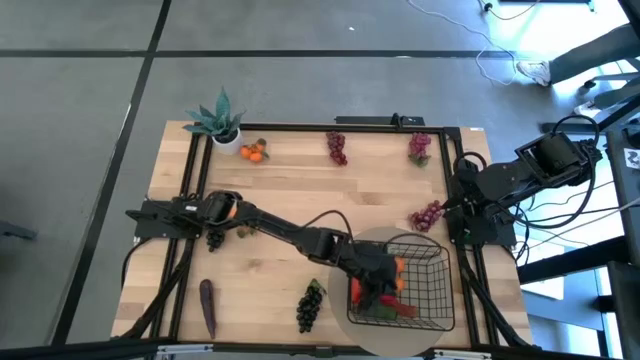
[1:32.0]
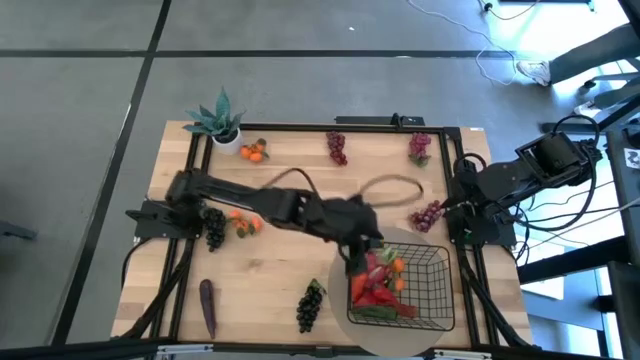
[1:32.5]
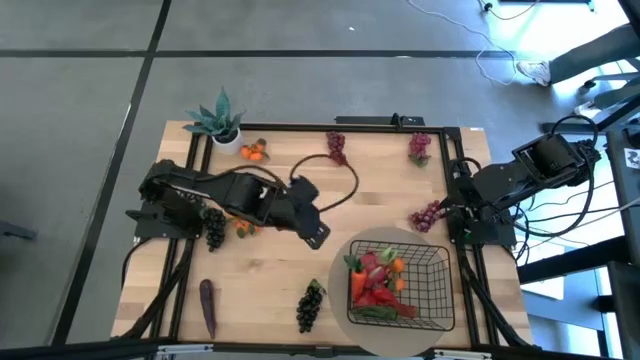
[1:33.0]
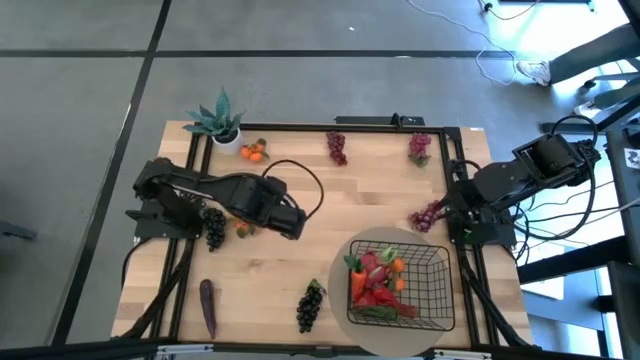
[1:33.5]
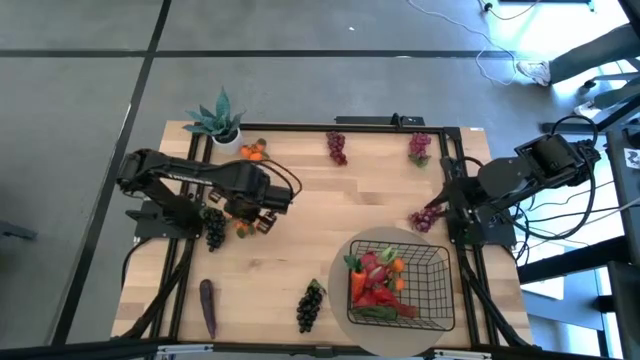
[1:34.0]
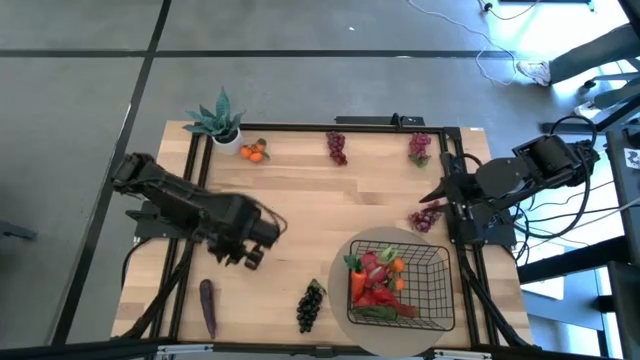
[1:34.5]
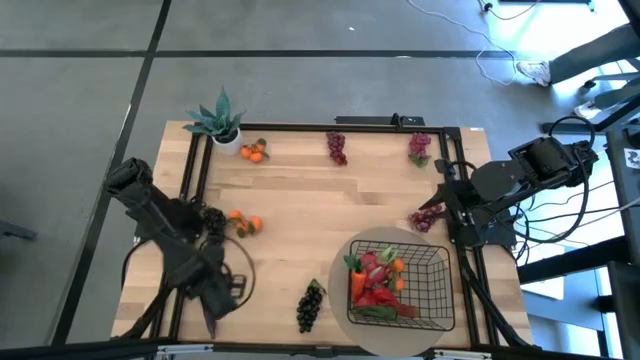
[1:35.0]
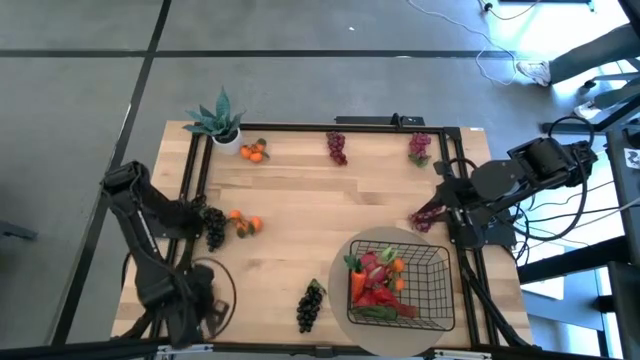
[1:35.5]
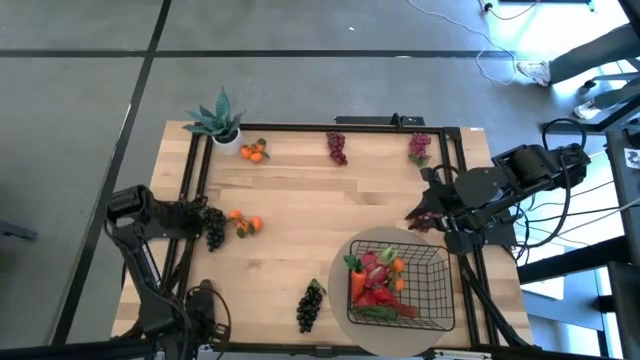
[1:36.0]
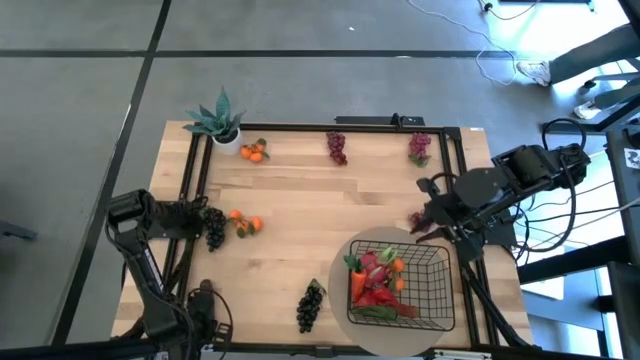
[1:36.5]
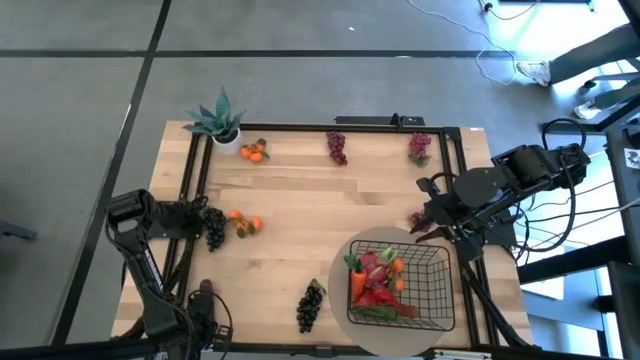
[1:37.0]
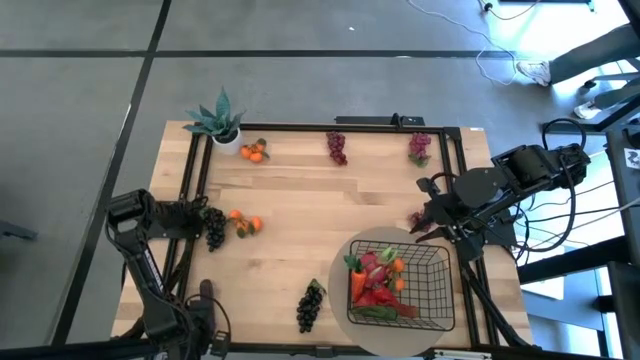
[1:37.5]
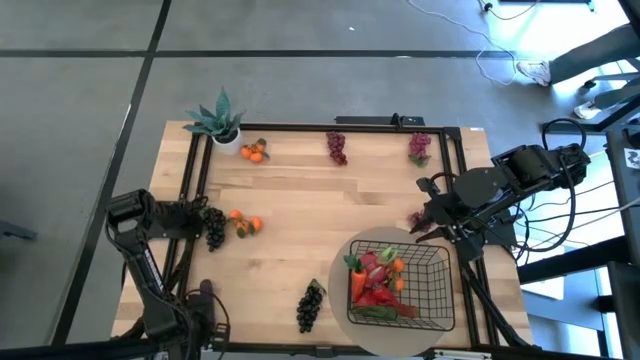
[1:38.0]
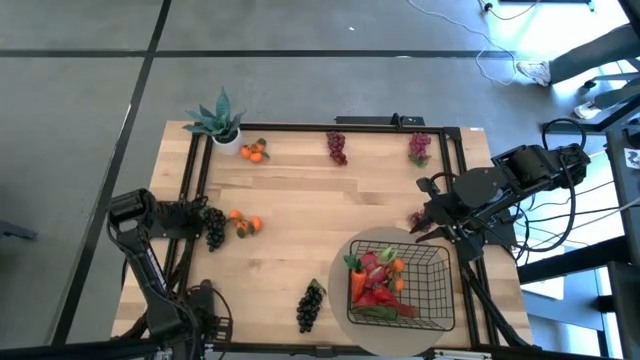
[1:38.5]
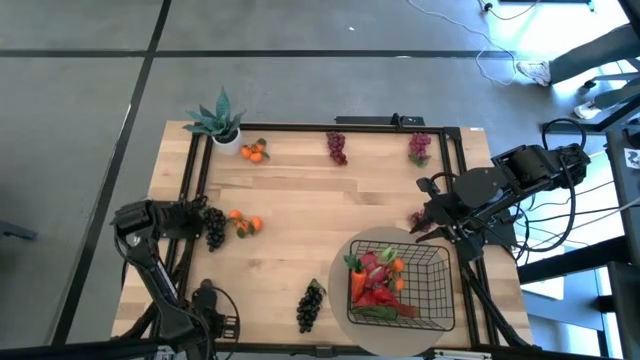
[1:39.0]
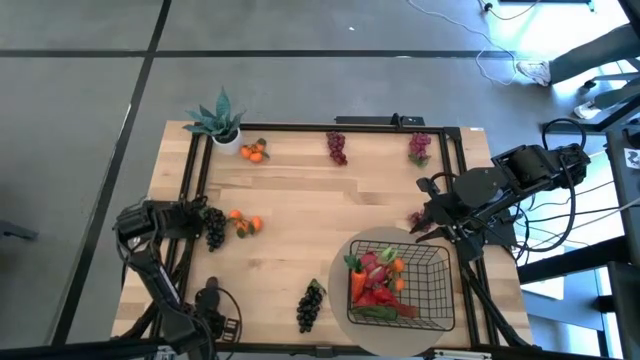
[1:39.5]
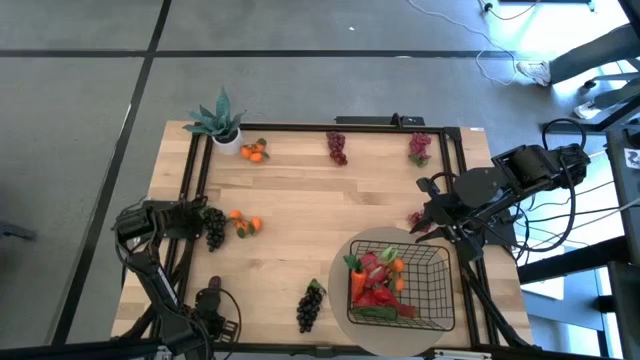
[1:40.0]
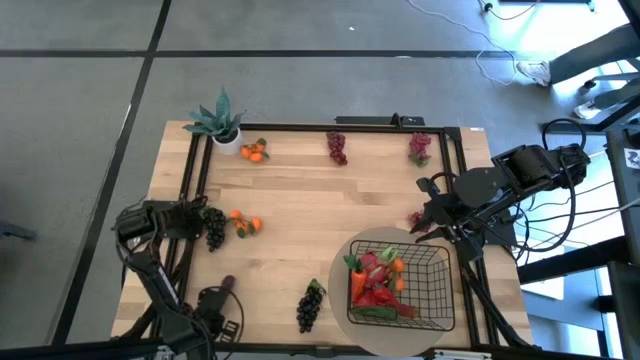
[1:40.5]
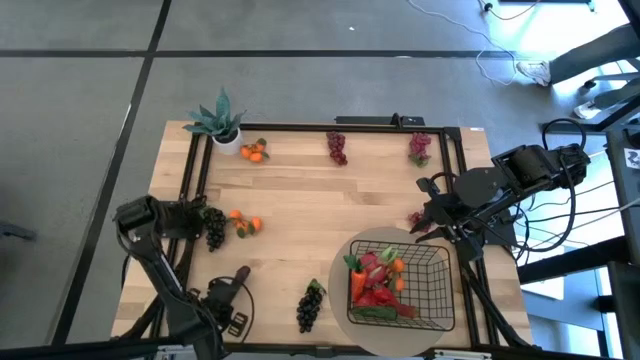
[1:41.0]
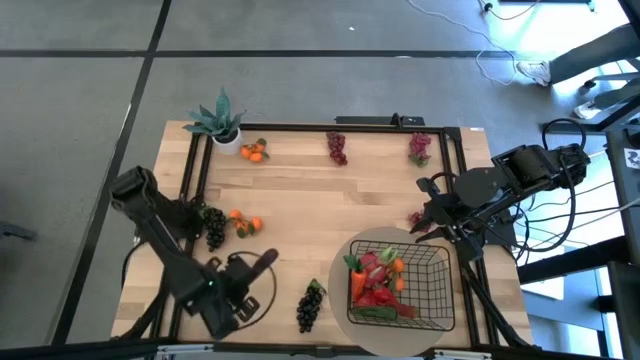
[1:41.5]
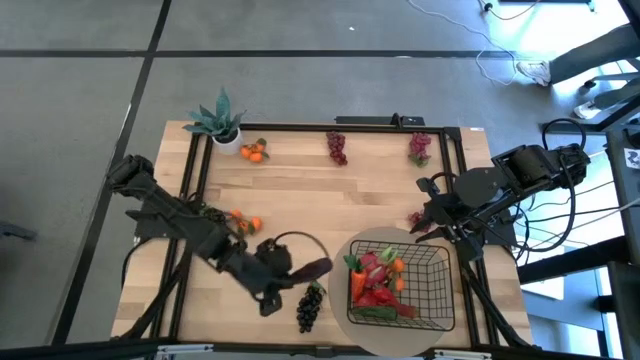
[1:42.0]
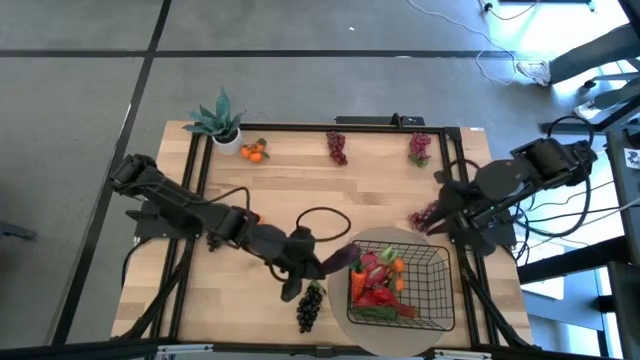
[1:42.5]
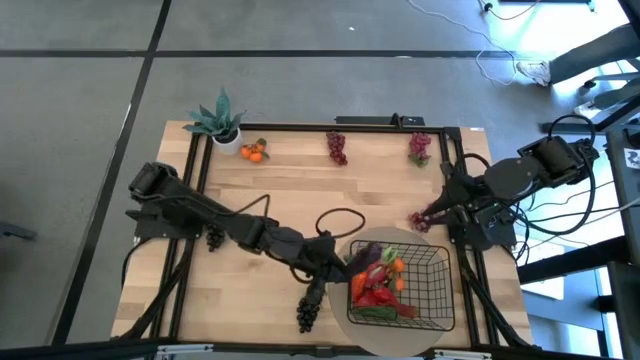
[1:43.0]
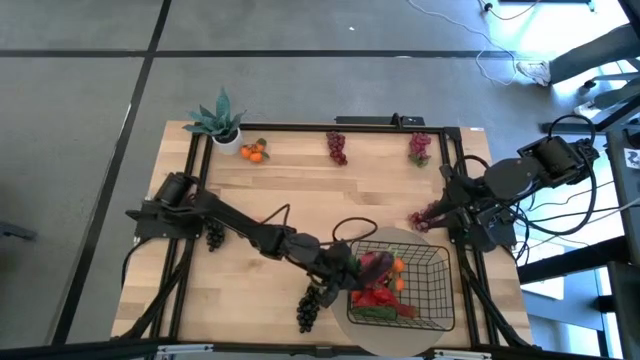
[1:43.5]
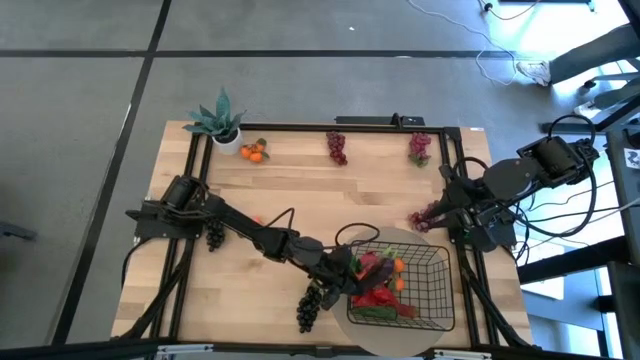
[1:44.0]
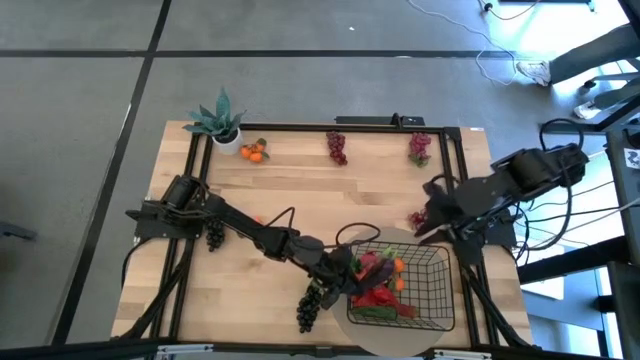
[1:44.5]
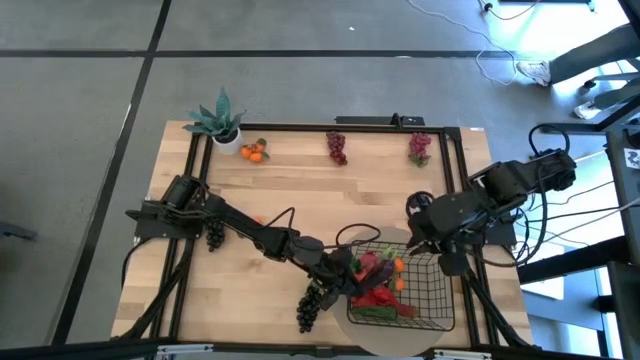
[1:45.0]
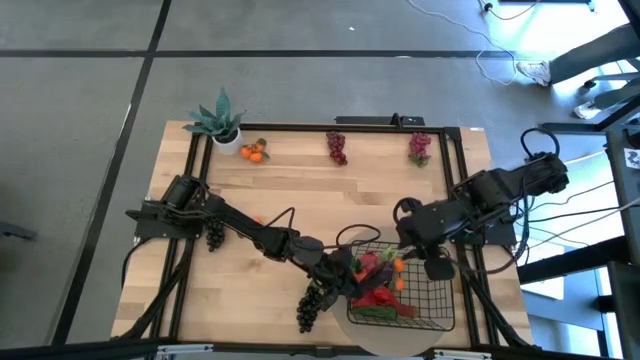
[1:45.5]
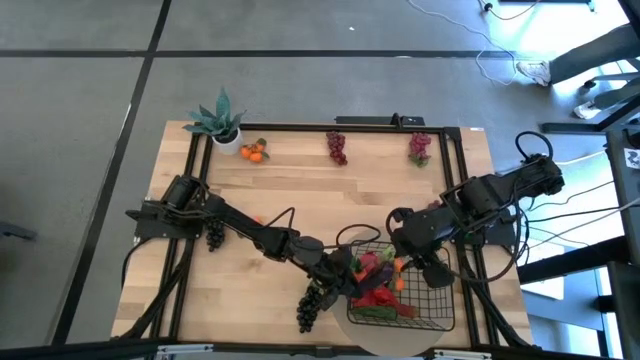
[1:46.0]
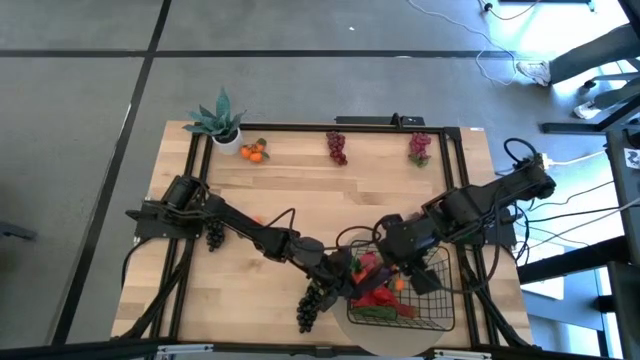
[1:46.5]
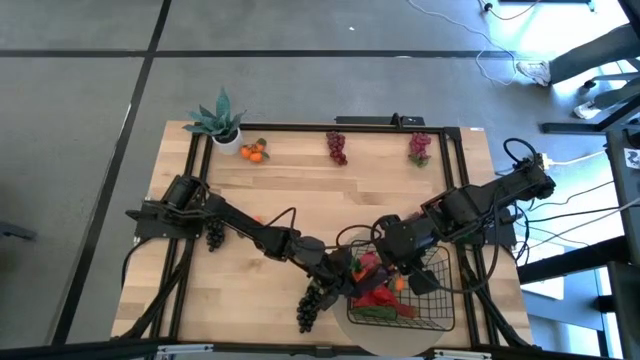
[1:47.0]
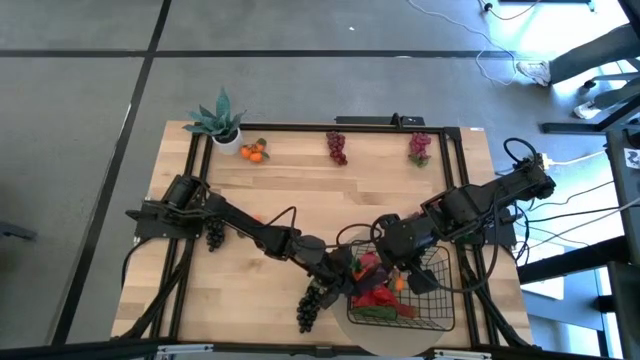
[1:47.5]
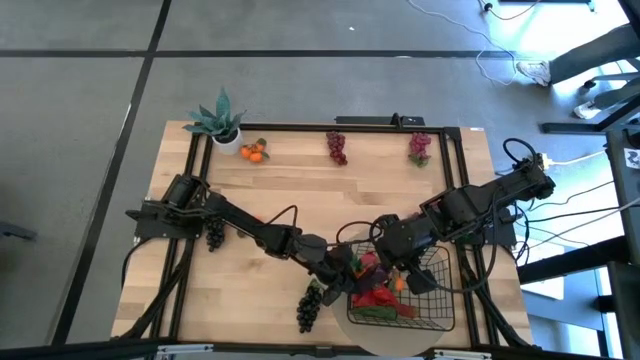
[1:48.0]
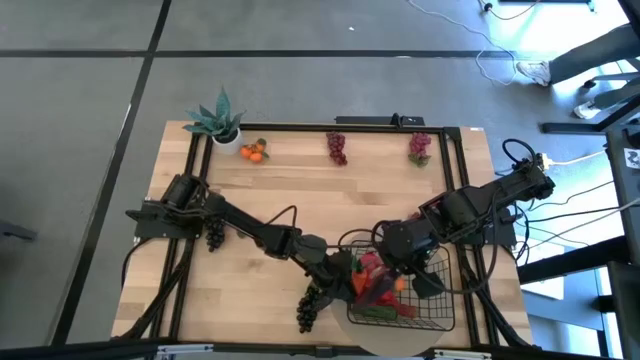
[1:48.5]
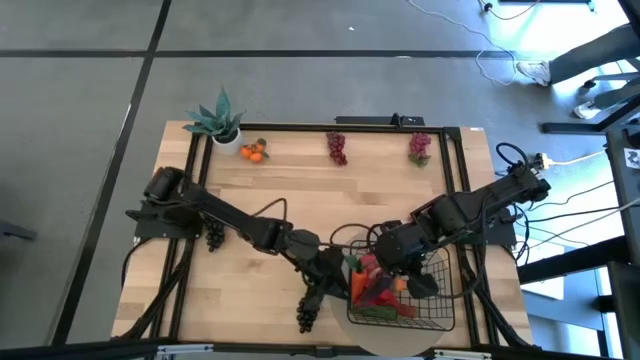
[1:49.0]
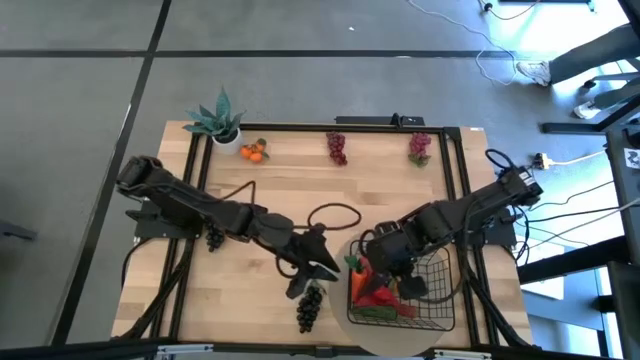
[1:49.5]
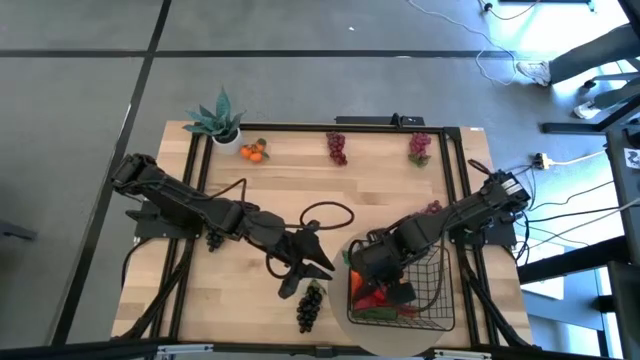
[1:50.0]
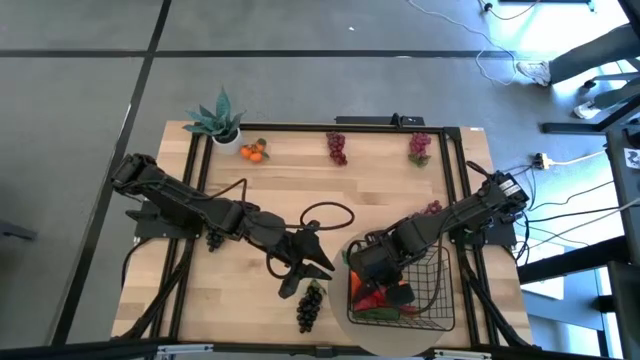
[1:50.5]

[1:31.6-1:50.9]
Task: Build produce basket
Put the eggplant into the black wire basket

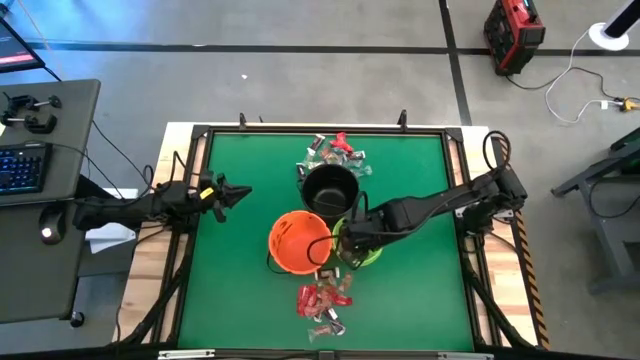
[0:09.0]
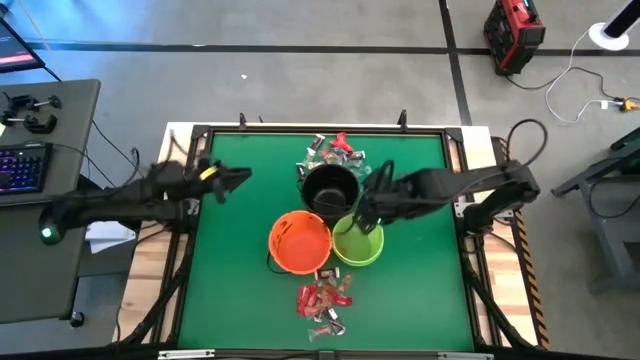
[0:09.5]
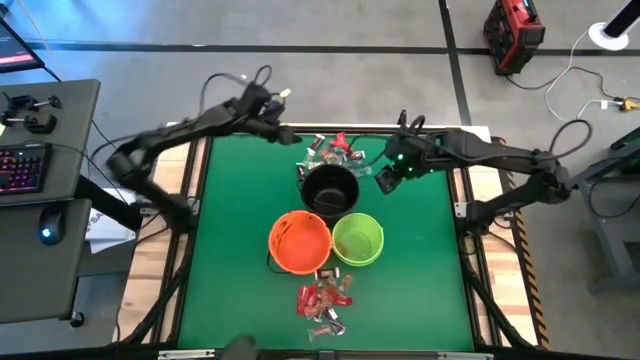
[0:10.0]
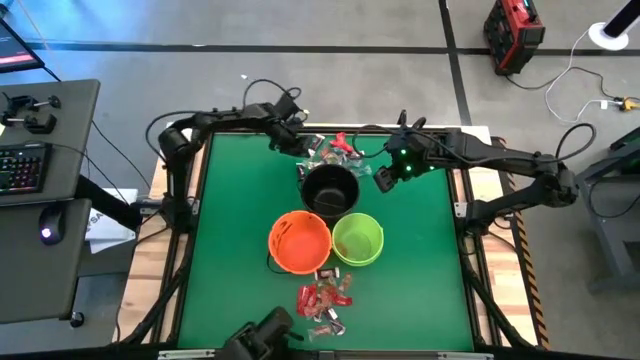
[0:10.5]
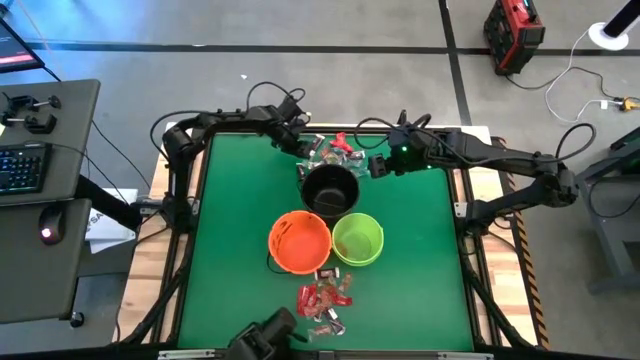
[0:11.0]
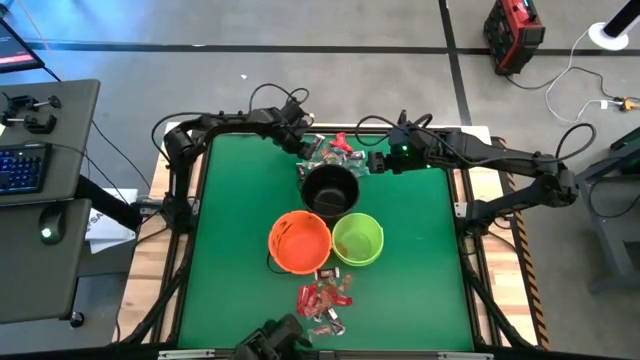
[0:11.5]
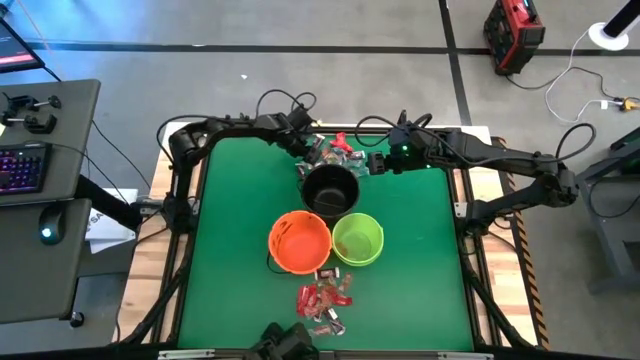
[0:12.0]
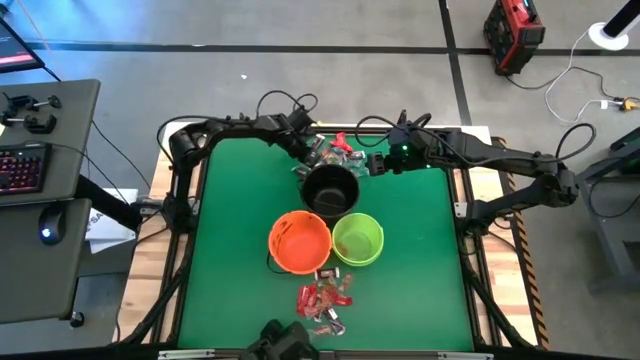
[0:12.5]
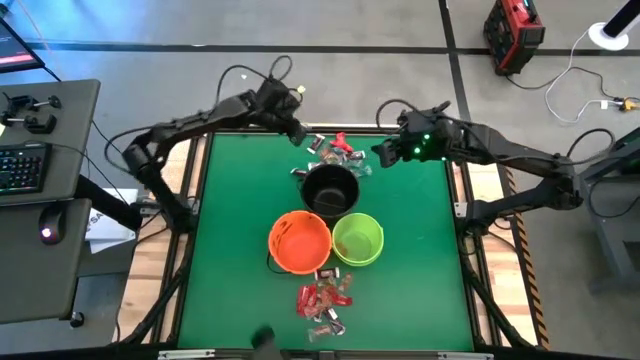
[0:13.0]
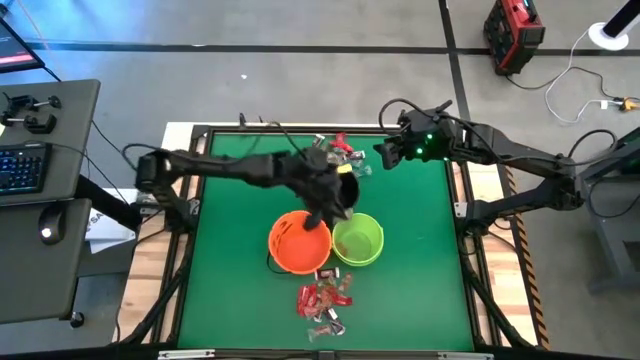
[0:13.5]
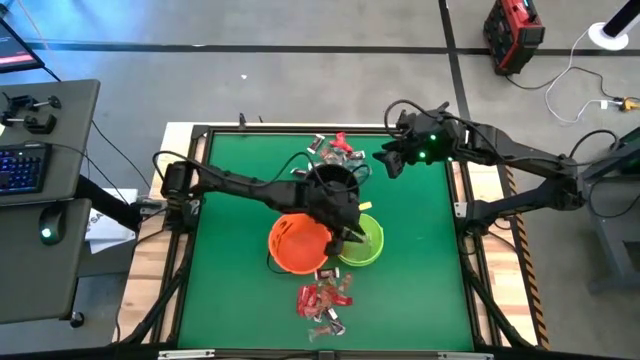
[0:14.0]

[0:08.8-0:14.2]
Task: Sort candy by brand, put in halloween buckets
Put the green gummy into the green bucket
